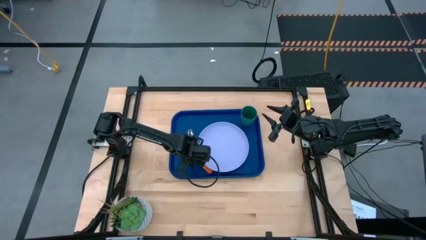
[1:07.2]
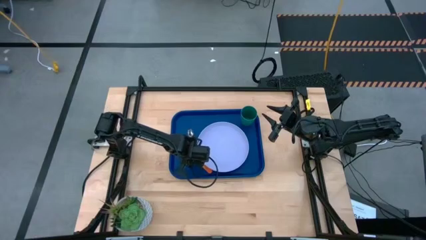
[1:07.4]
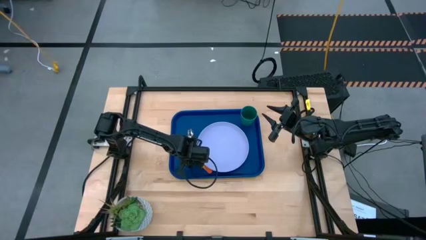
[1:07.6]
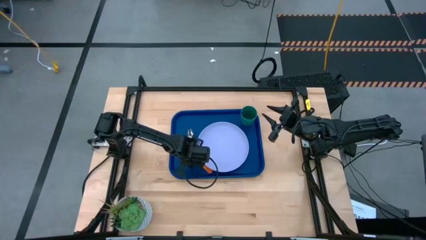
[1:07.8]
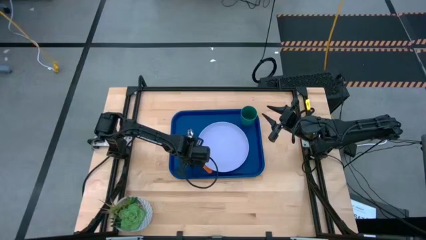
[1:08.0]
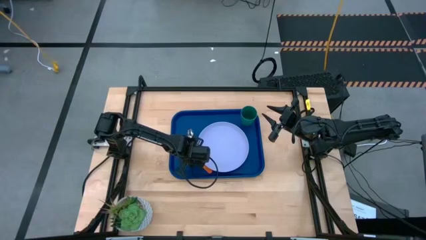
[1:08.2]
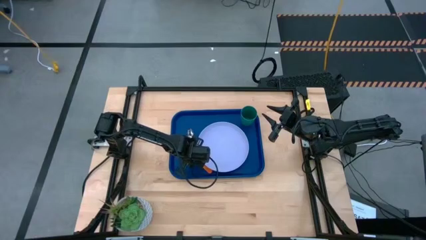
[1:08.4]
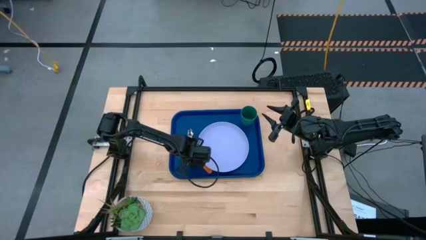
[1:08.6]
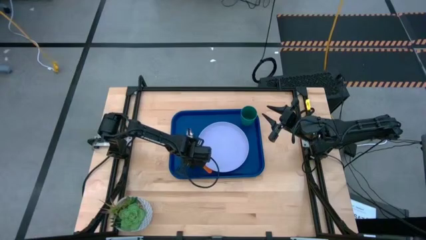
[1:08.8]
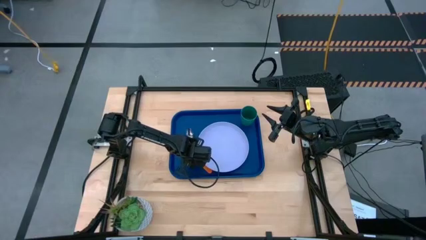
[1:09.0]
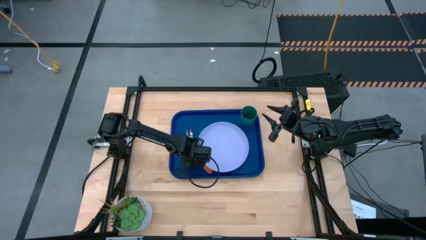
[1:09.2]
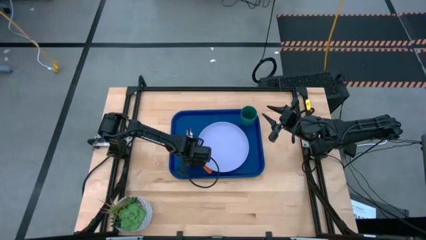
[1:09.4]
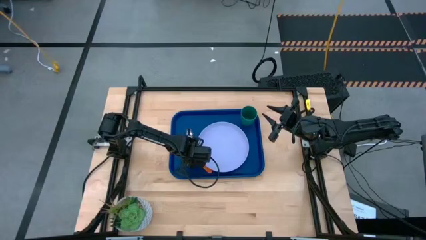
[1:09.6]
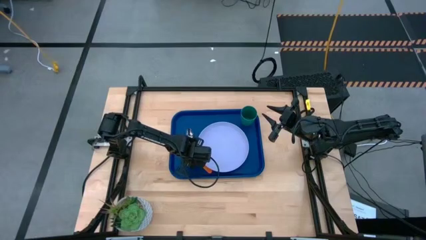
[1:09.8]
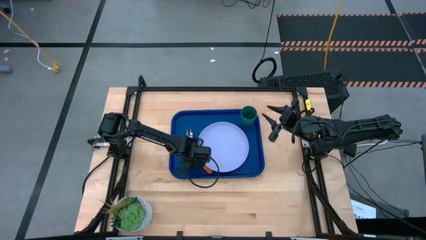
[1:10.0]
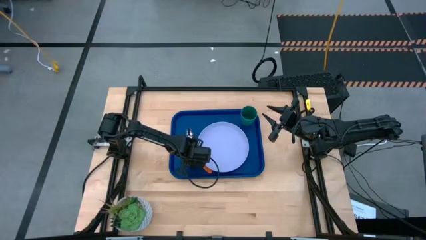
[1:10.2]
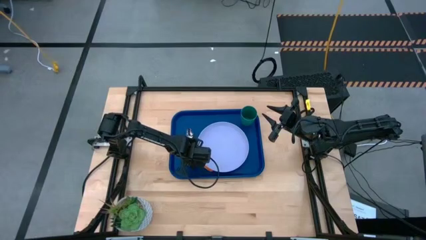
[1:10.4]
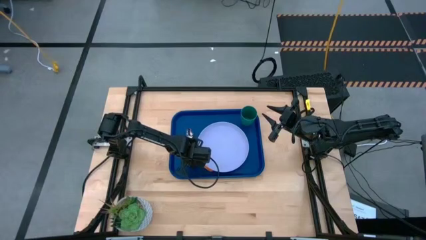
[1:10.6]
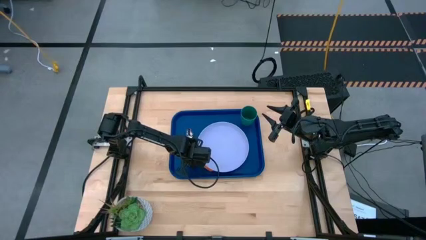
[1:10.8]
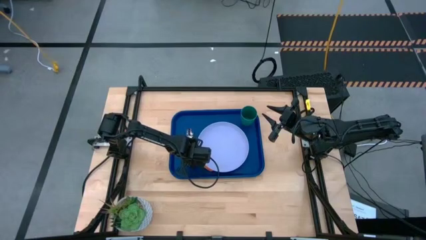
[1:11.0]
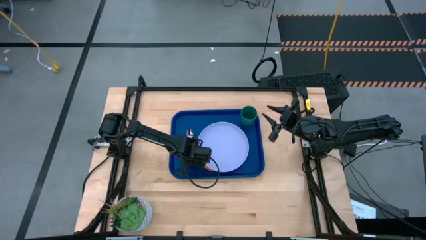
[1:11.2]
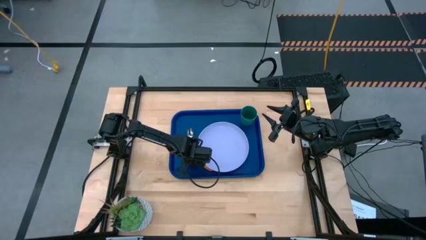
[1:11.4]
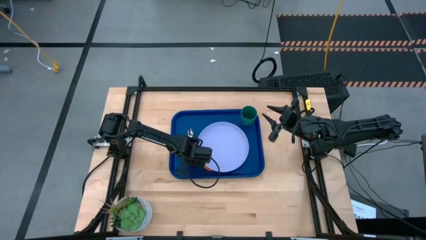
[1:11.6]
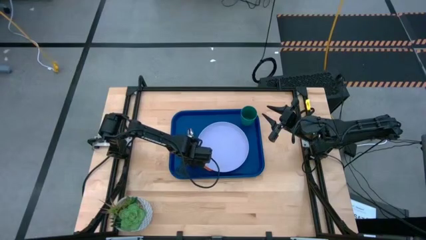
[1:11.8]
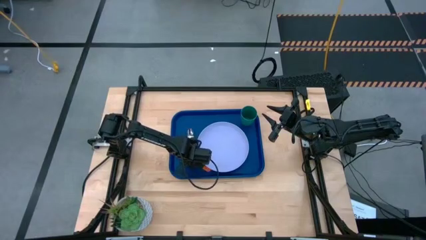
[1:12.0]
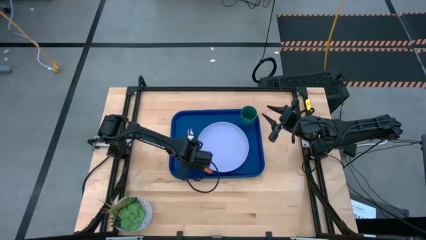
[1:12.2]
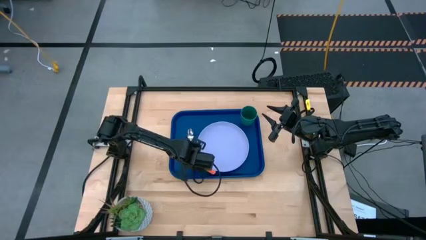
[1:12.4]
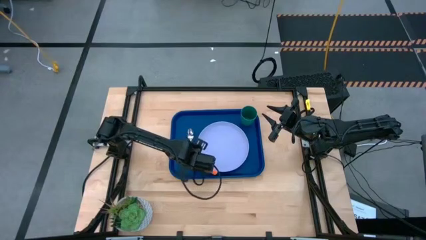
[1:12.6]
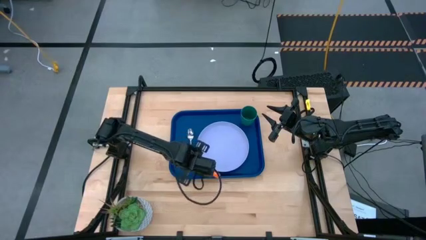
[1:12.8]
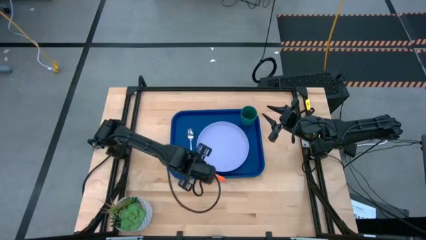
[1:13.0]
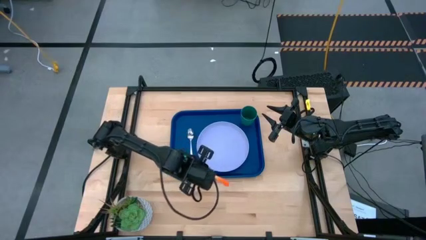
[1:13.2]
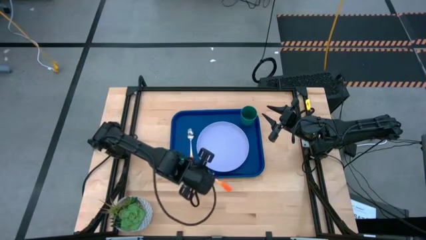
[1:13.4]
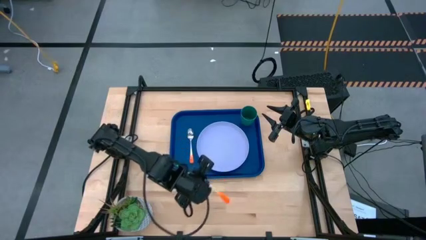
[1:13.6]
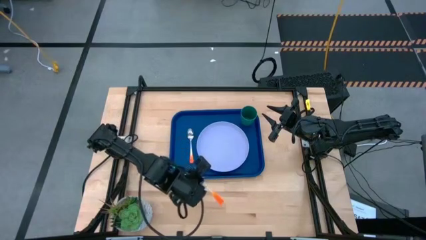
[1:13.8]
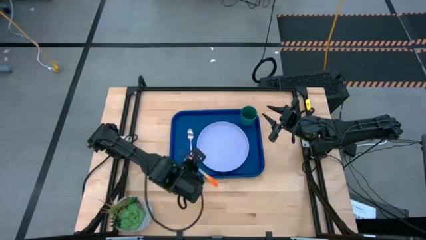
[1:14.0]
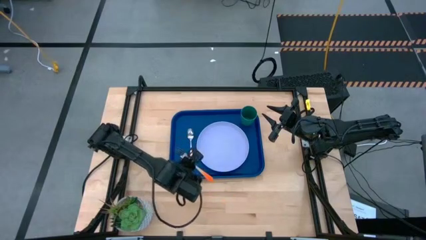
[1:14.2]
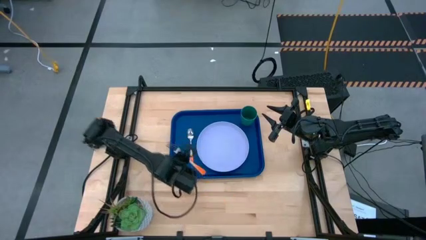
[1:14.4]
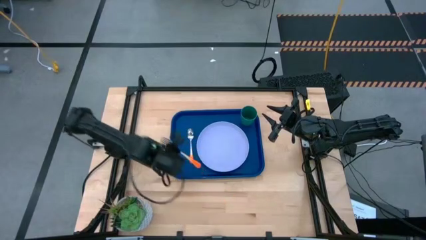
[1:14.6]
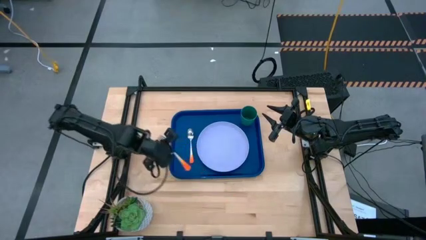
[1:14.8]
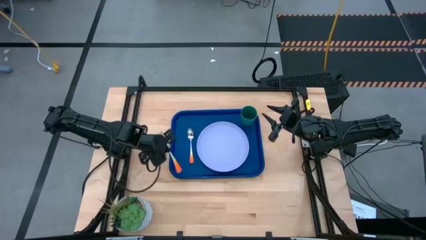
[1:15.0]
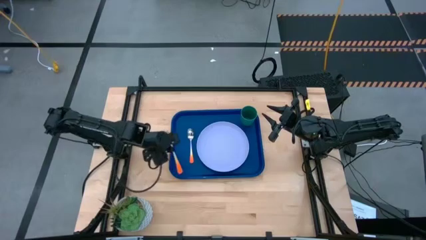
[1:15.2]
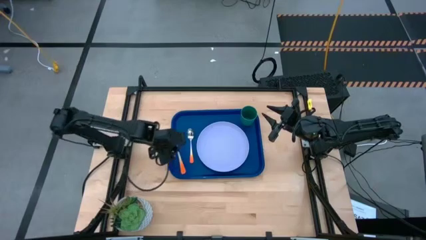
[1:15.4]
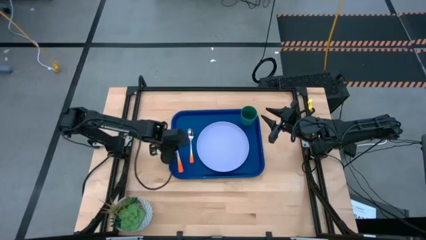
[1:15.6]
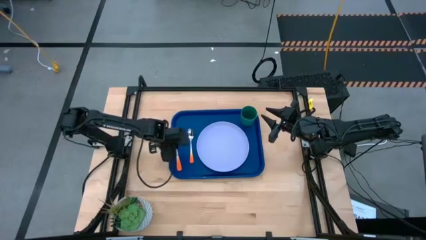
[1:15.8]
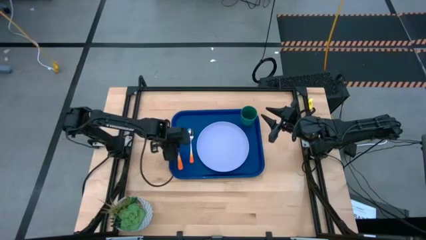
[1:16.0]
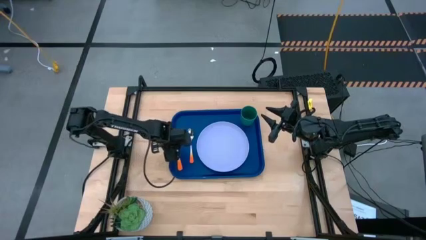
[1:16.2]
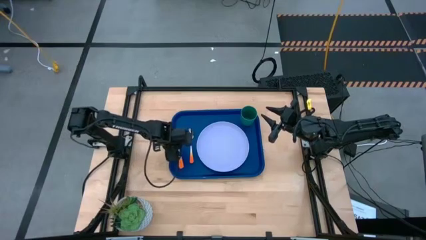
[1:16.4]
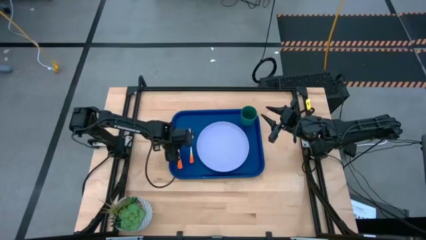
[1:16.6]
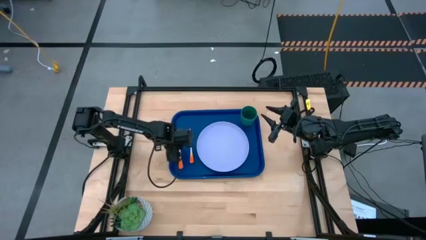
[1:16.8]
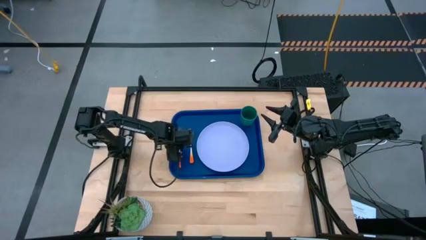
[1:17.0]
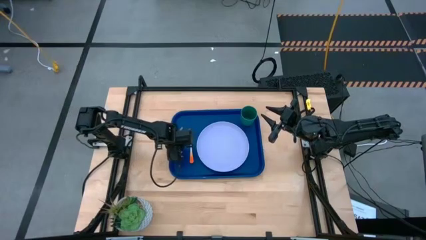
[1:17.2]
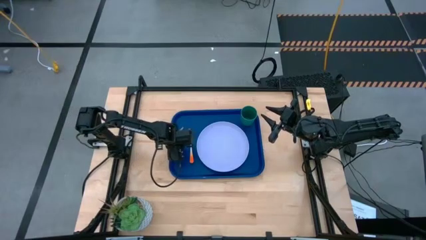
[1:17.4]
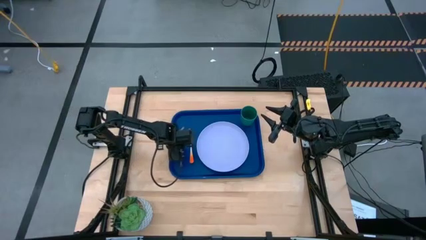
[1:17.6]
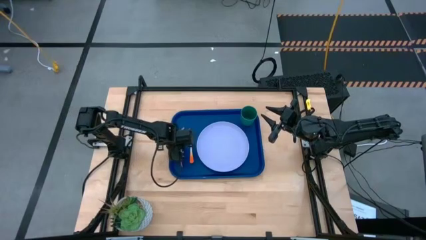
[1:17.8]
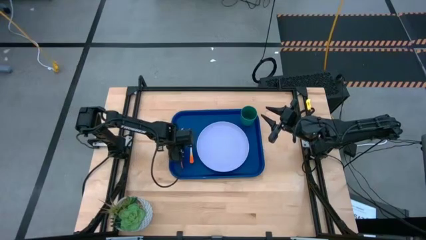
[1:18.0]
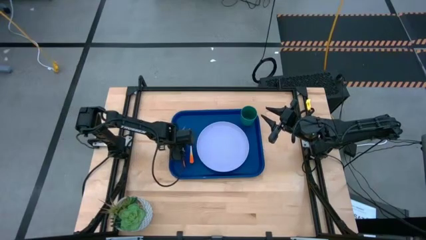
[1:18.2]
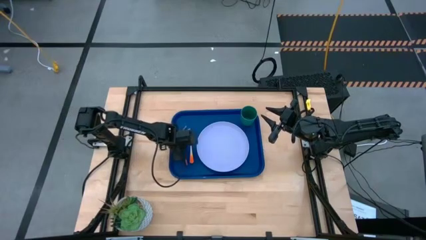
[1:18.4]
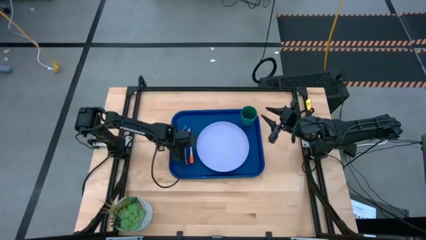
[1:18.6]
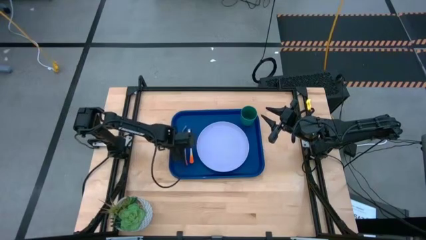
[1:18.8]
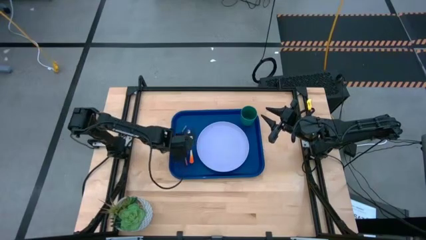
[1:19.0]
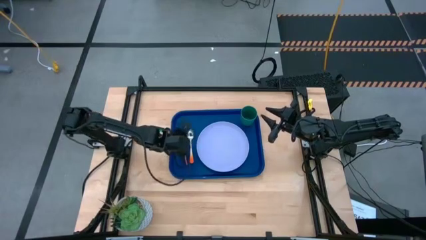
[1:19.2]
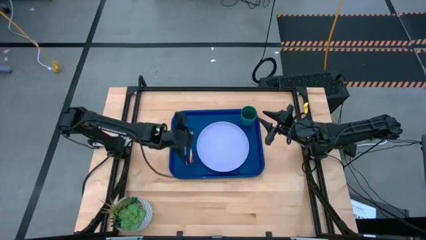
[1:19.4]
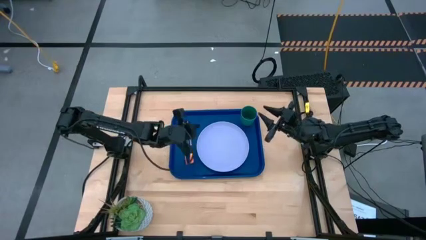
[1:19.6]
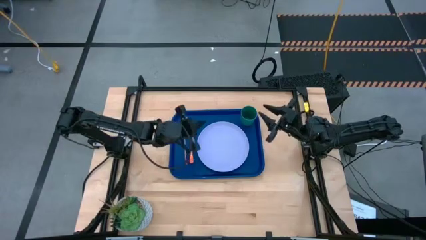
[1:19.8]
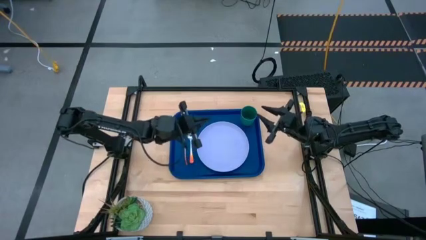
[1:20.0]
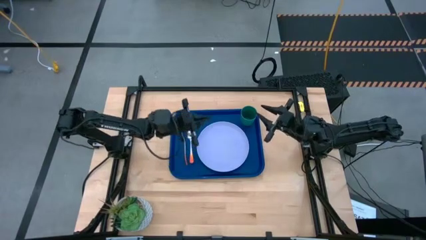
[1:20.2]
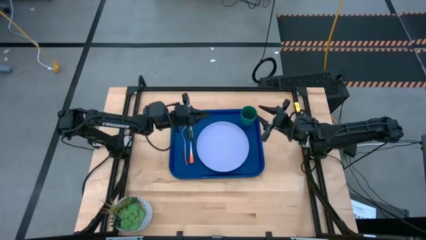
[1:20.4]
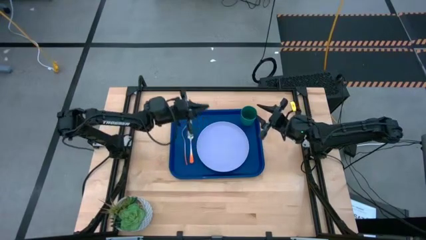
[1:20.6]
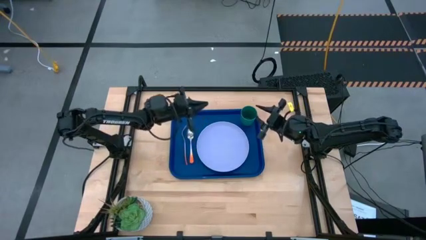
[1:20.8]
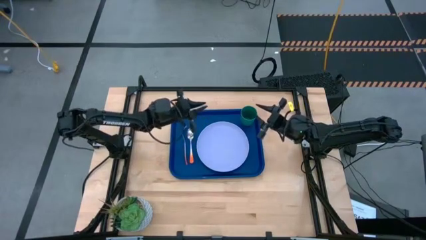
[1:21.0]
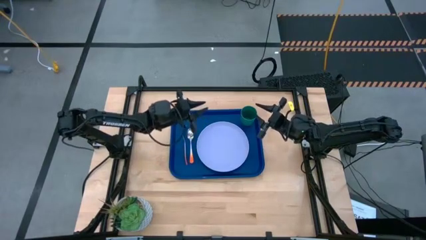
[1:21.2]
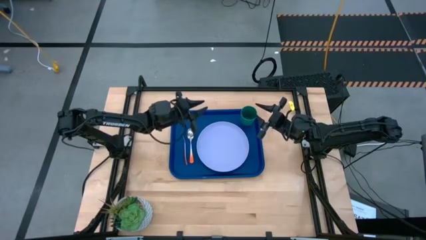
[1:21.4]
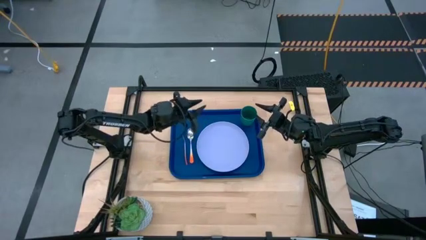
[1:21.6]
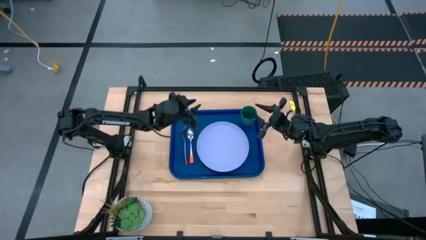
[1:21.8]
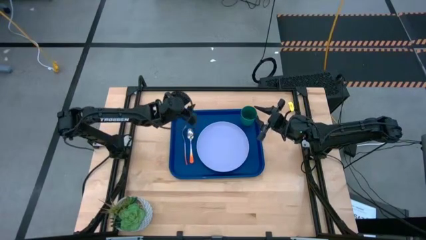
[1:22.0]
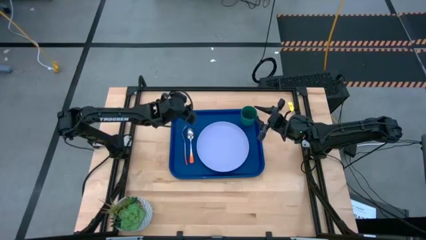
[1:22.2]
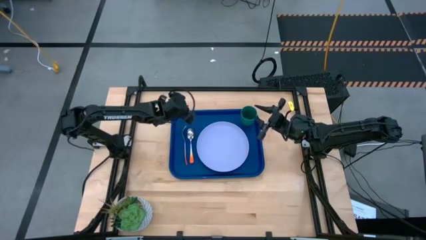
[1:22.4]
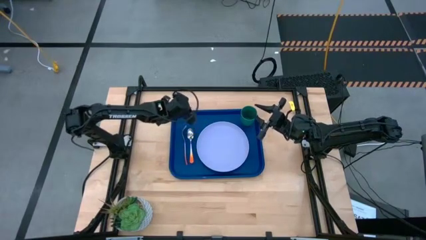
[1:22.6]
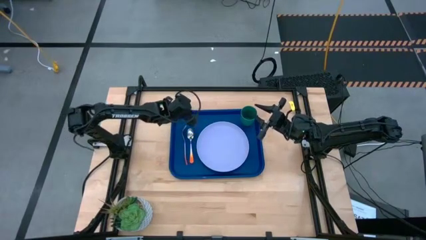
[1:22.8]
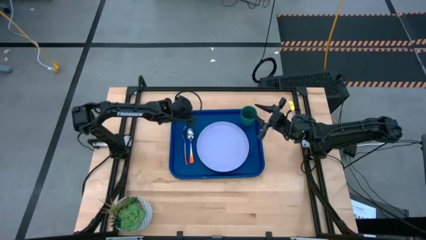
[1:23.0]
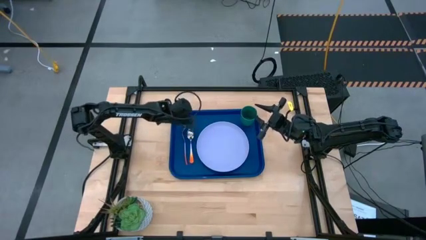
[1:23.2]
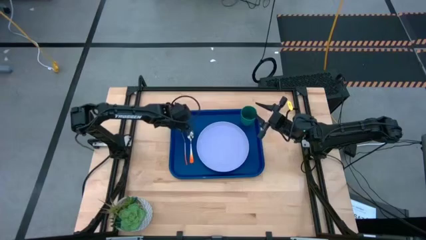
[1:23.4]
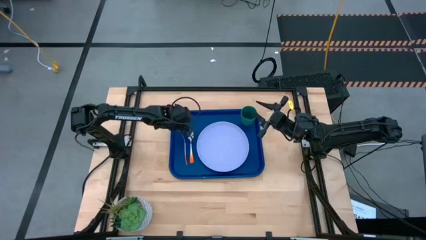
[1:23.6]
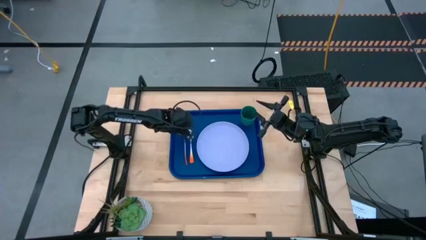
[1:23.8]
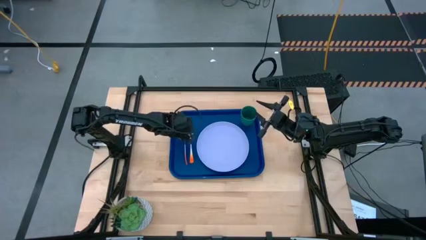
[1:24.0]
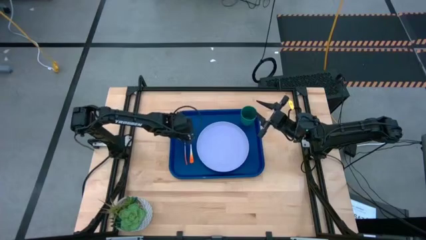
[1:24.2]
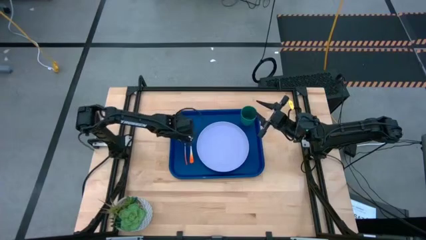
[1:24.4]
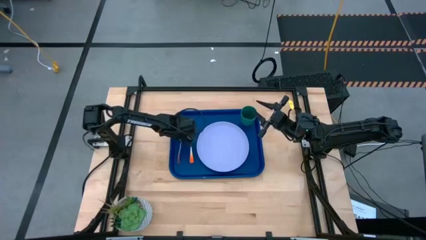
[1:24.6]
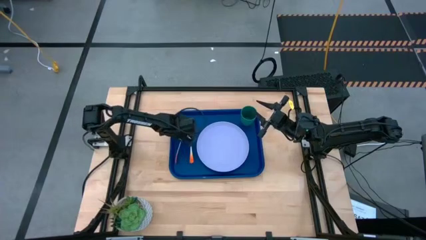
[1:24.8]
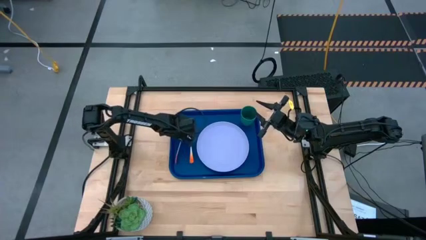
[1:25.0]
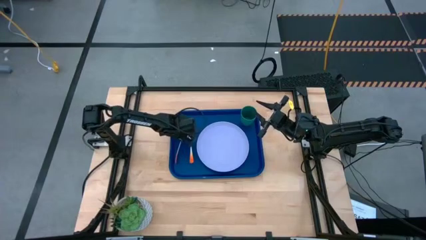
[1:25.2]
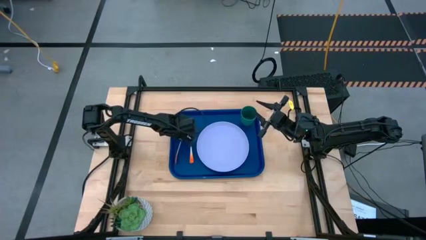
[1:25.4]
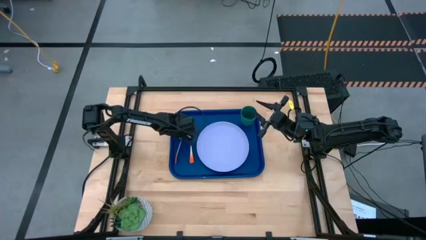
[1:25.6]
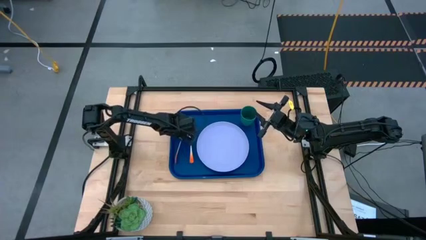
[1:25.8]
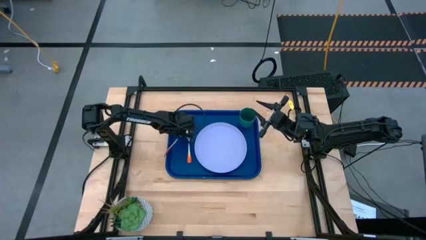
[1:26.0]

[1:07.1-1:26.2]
Task: Pick and place plate/cup/fork/spoon on tray
Put the orange fork to the left of the orange spoon on the blue serving tray
